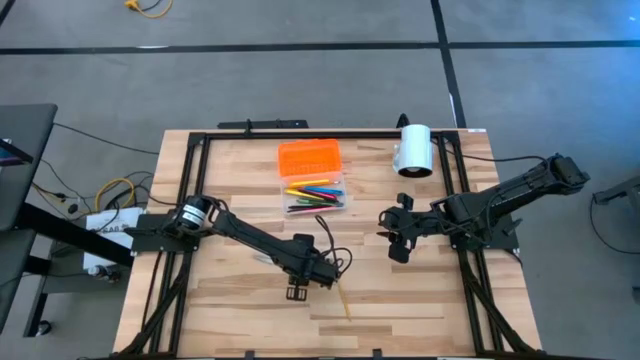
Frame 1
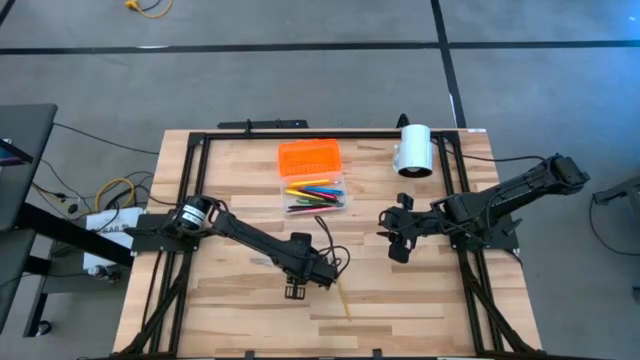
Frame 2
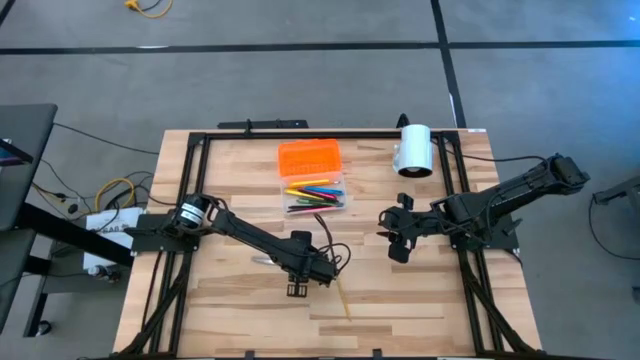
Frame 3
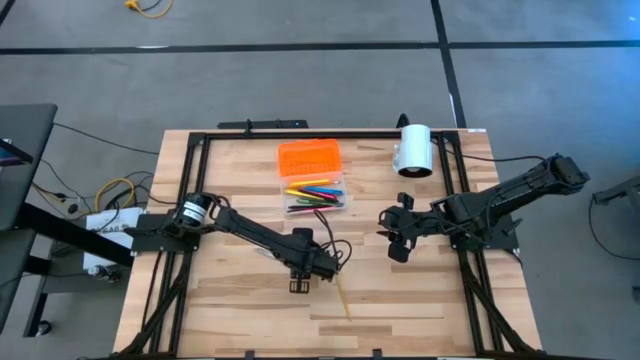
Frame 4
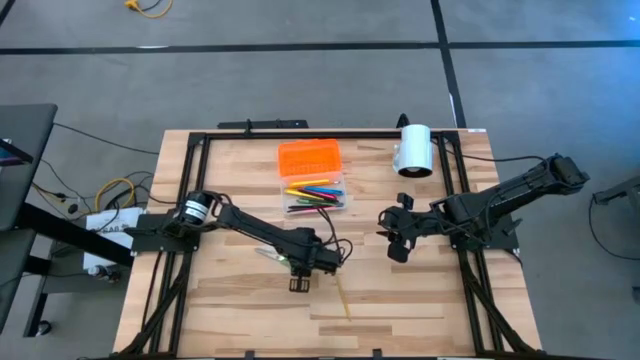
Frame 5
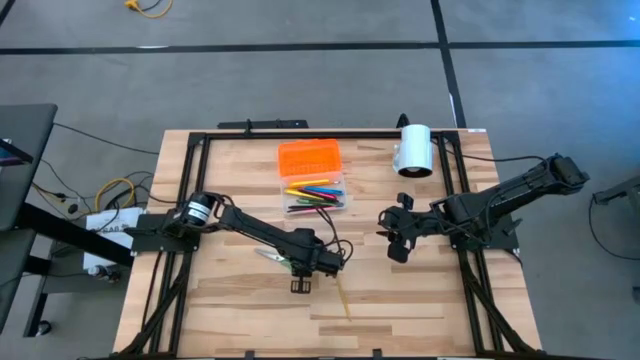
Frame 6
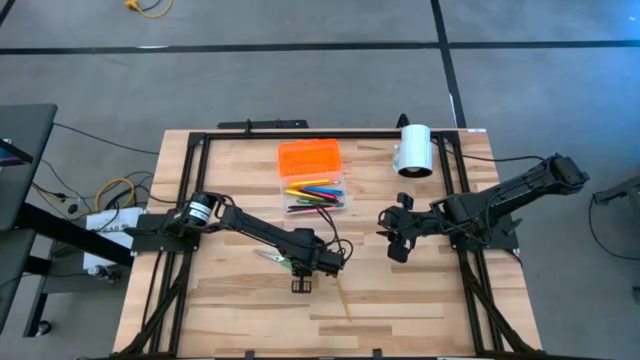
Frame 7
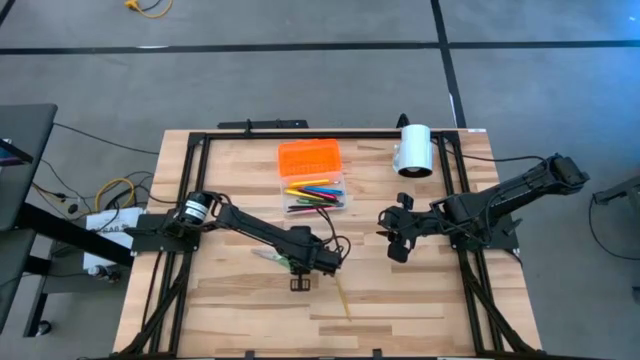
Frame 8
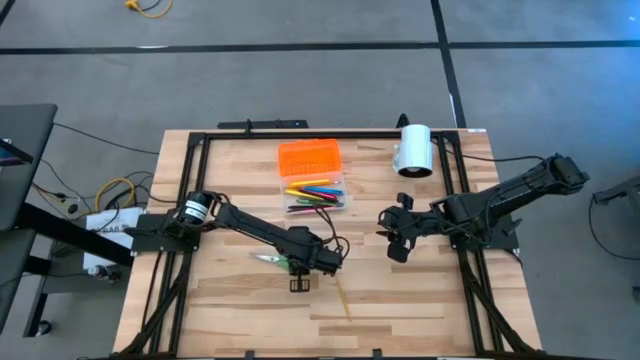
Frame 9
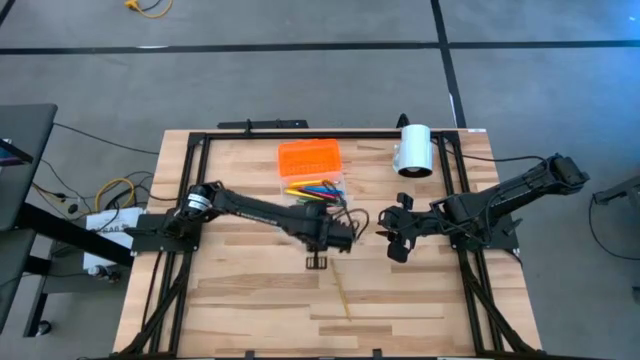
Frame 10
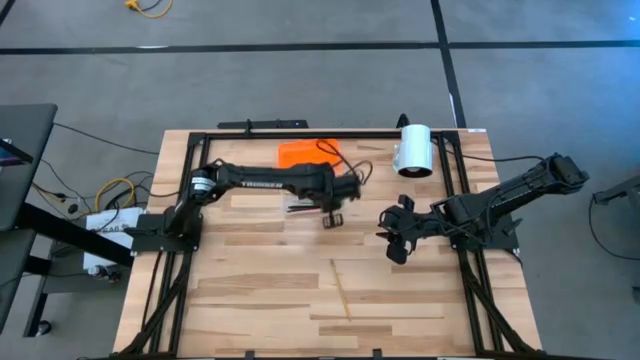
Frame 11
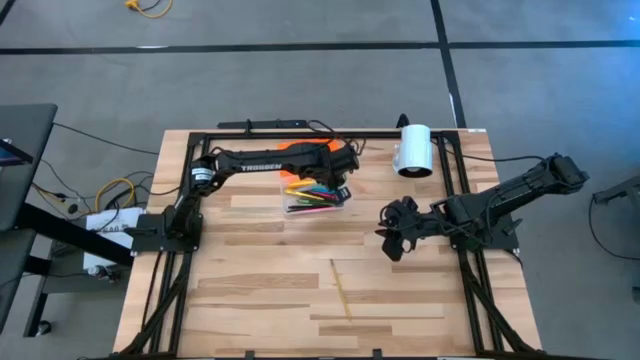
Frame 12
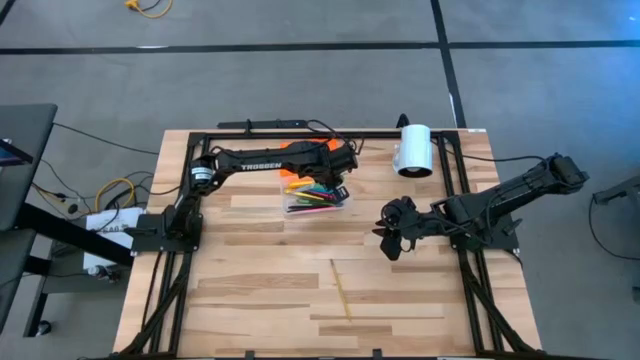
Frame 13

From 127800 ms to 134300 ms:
Task: Pick & place school supplies into a supply box
Put the green scissors into the supply box

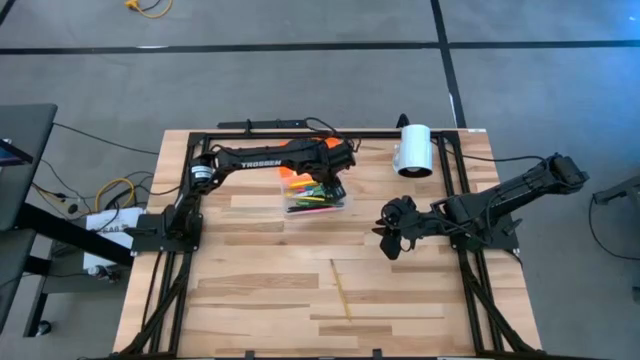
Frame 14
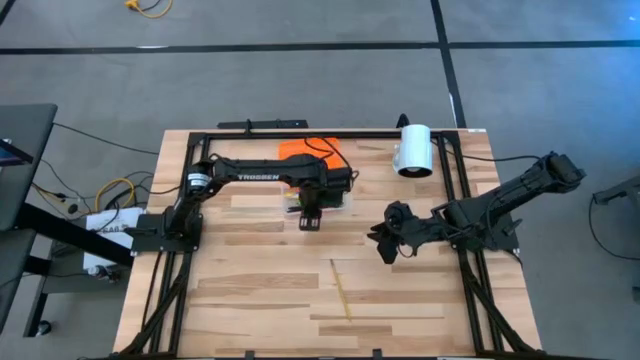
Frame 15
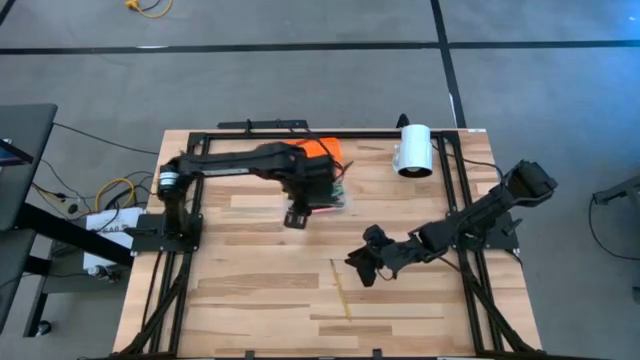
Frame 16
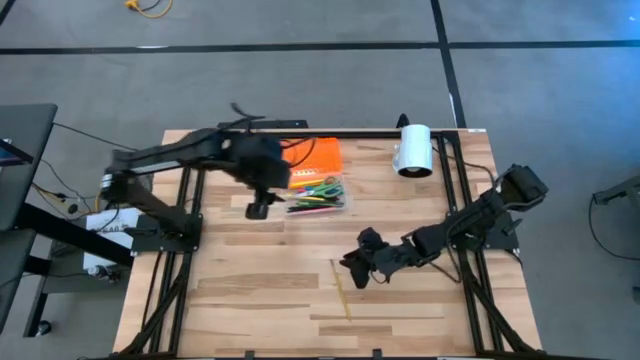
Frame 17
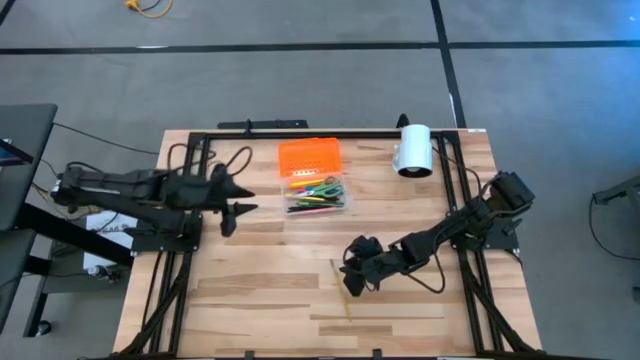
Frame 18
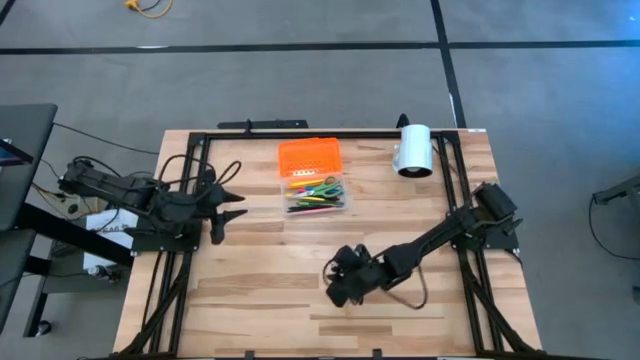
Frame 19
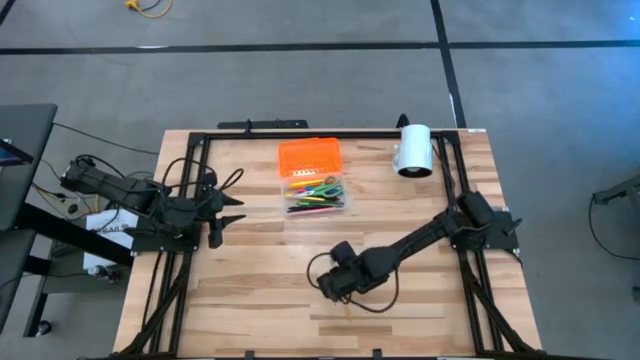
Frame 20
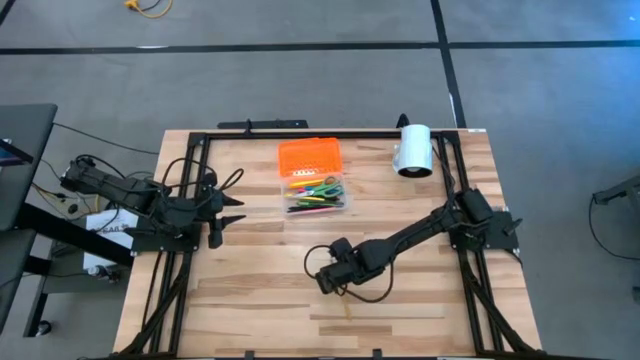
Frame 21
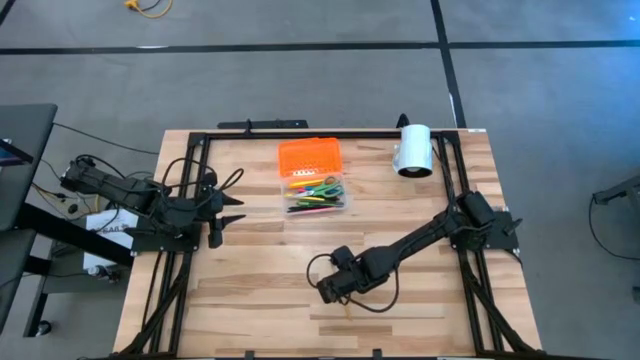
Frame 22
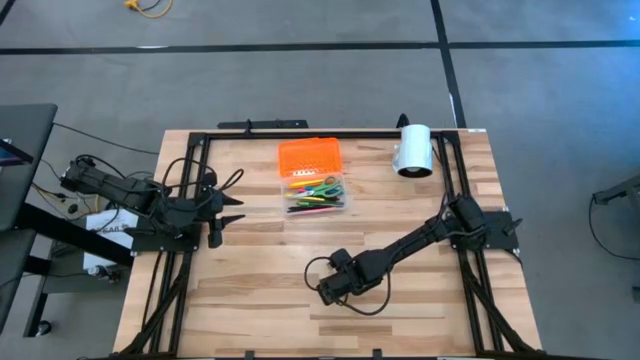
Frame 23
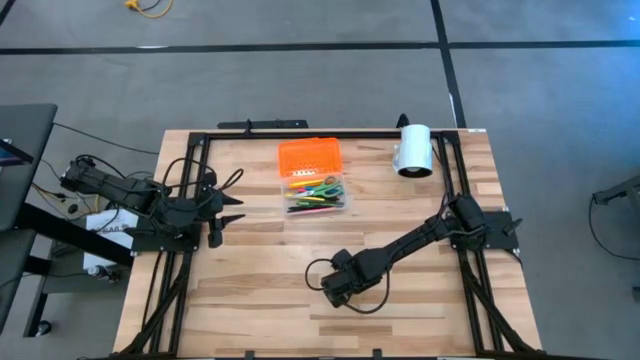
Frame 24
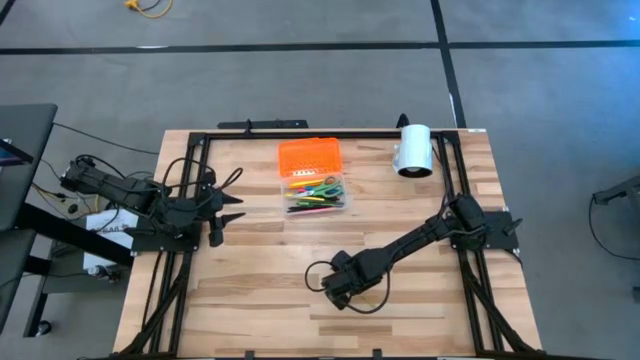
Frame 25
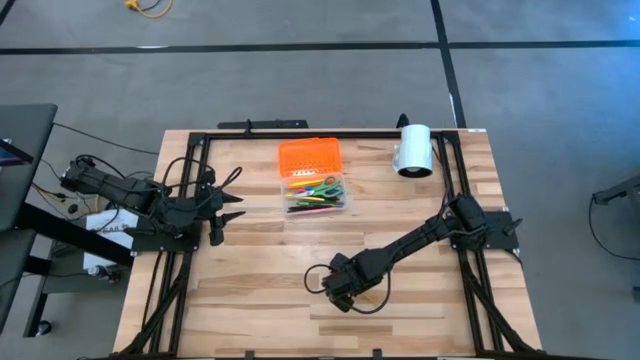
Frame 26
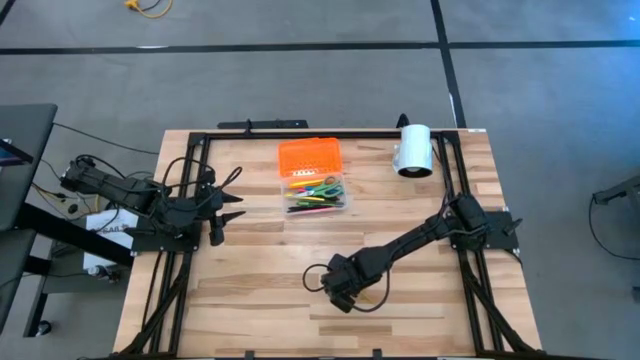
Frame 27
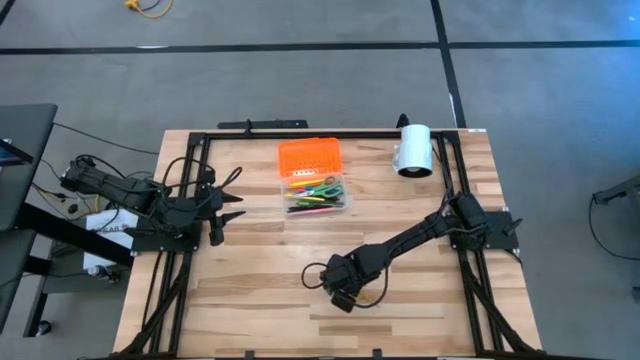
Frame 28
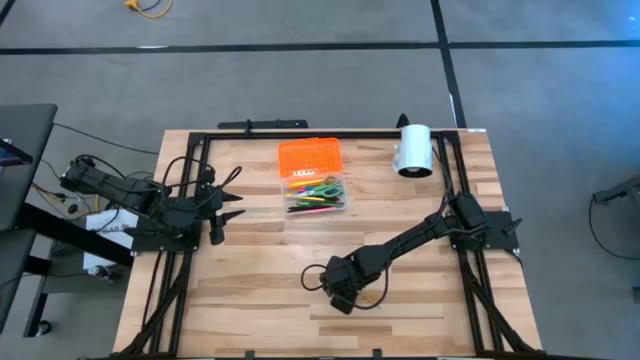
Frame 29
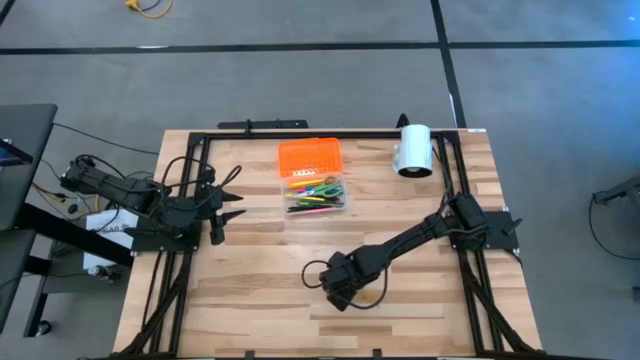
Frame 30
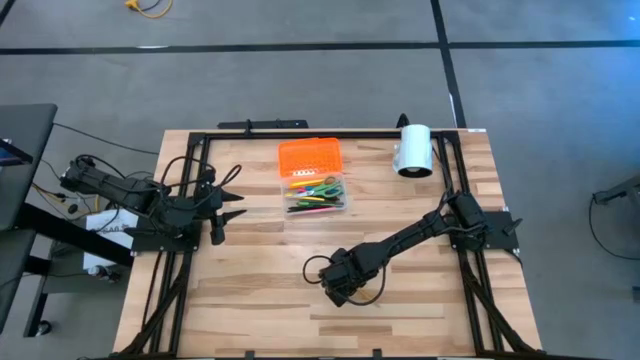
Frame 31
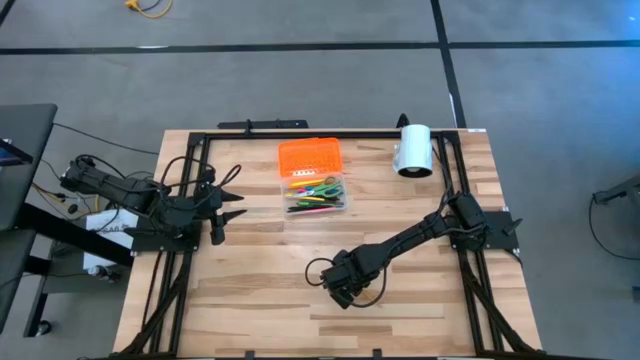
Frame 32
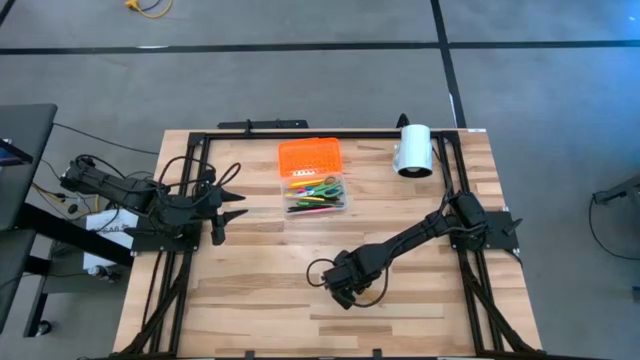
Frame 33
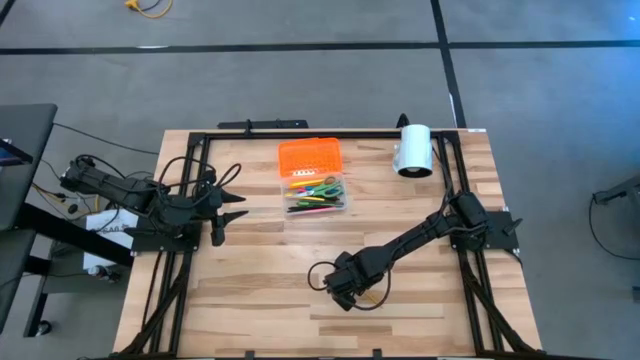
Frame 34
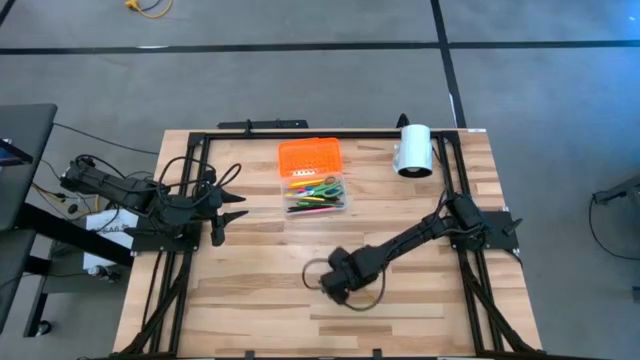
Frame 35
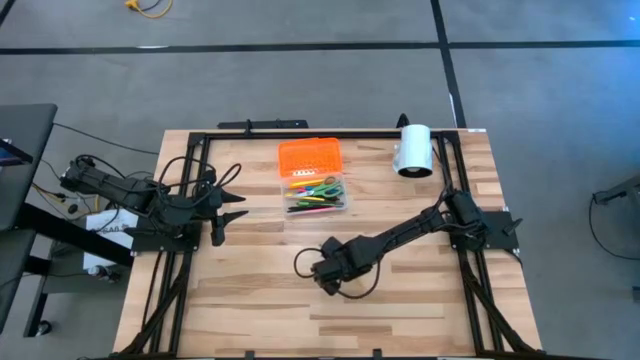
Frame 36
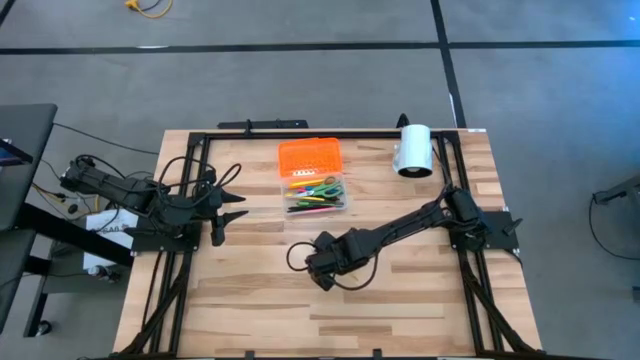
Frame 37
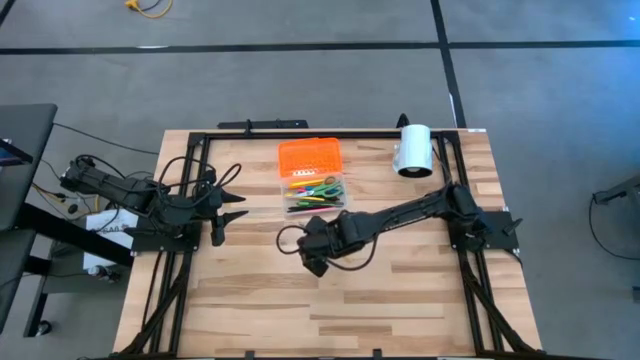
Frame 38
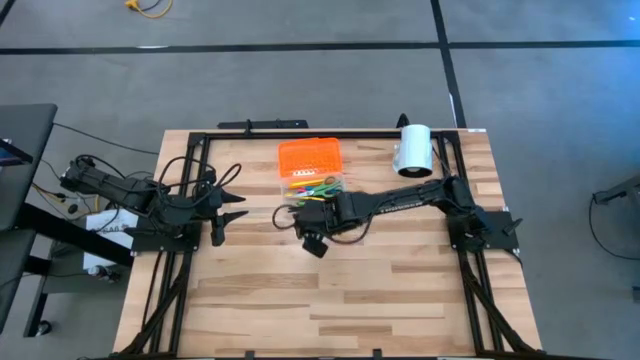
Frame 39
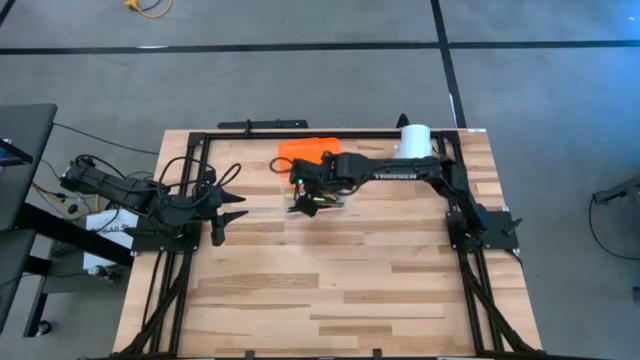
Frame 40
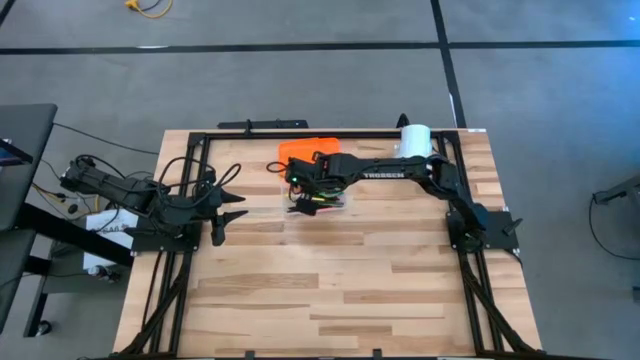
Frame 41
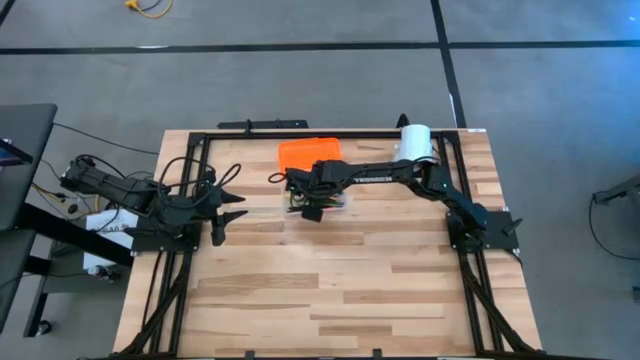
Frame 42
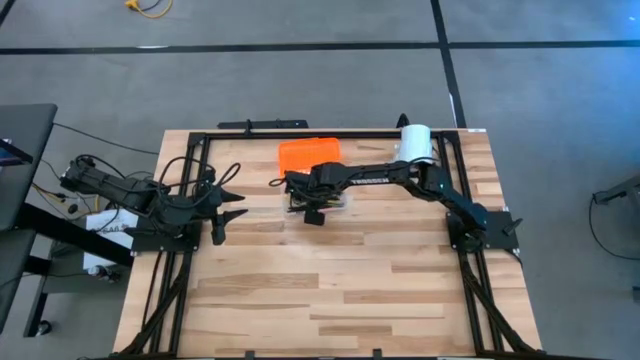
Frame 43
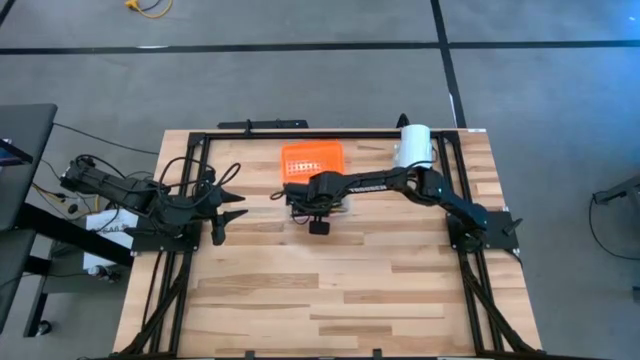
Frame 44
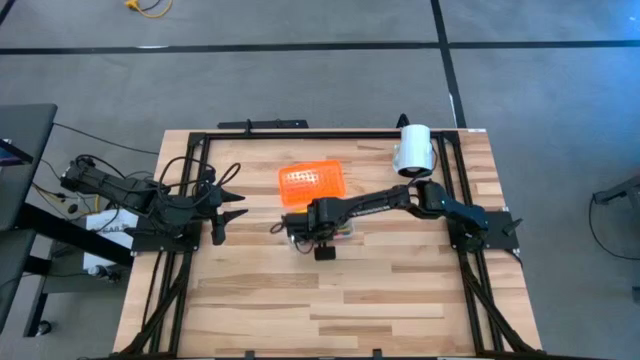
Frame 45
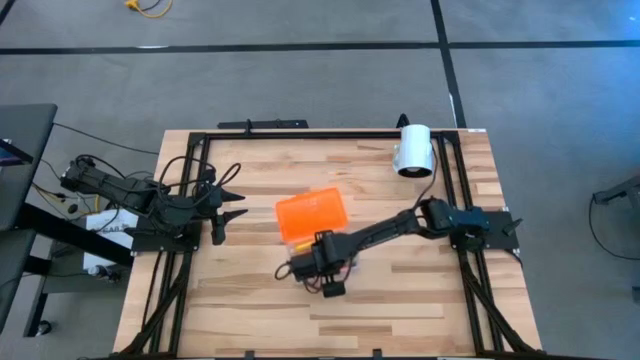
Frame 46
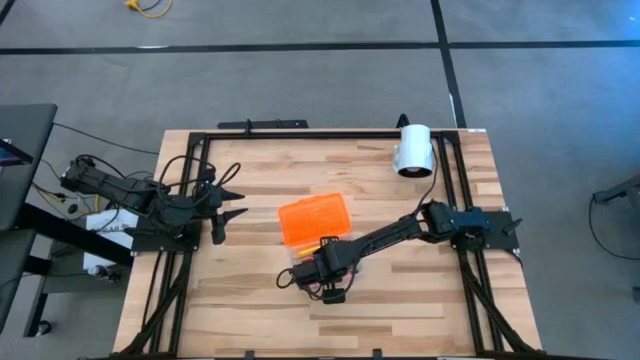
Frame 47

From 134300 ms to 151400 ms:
Put the yellow pencil into the supply box
